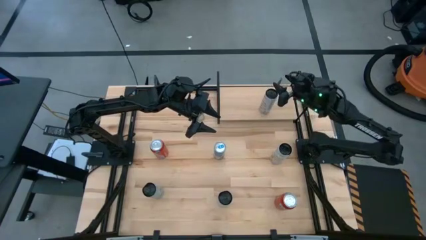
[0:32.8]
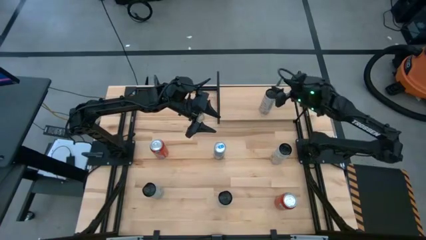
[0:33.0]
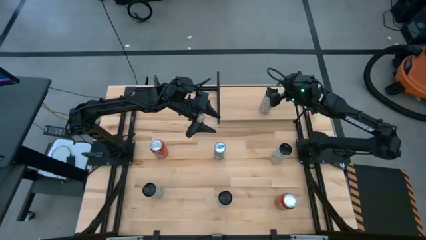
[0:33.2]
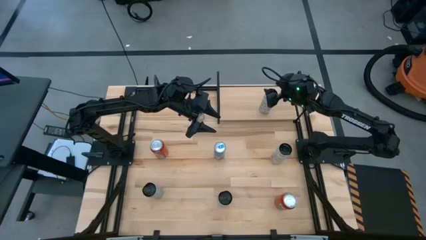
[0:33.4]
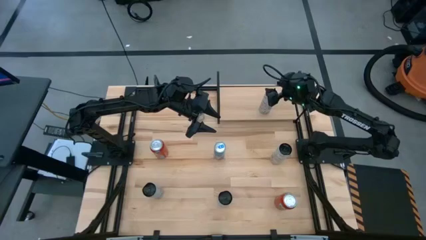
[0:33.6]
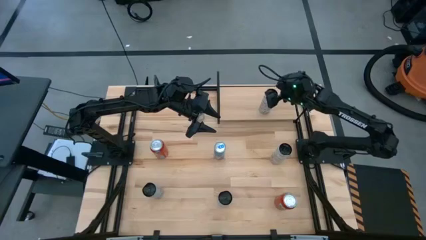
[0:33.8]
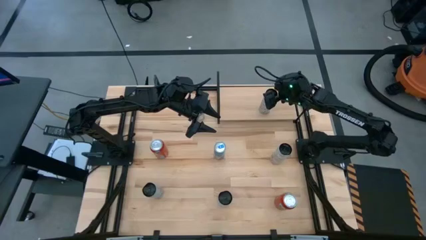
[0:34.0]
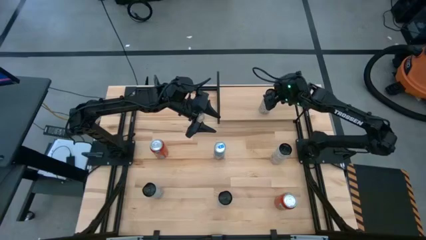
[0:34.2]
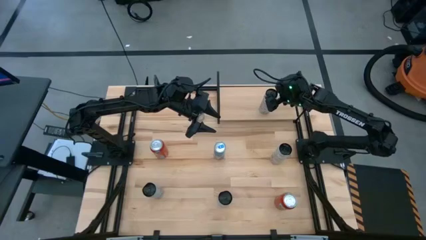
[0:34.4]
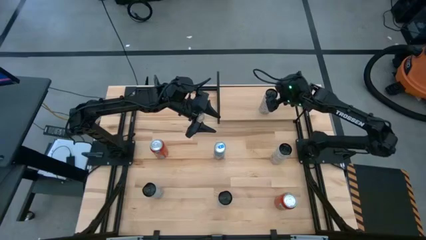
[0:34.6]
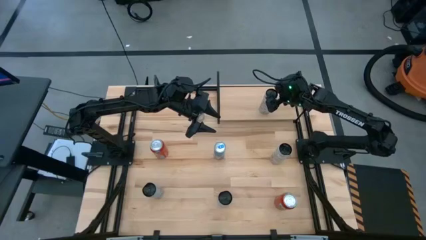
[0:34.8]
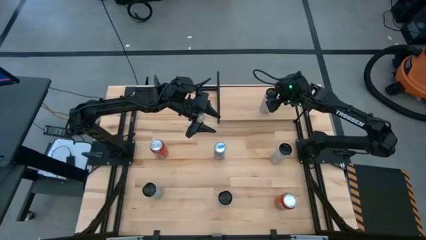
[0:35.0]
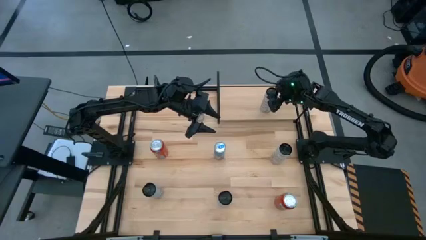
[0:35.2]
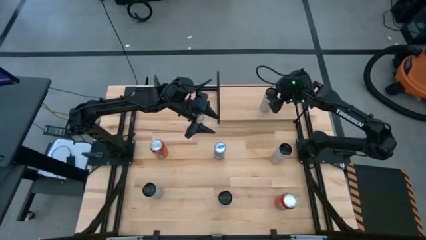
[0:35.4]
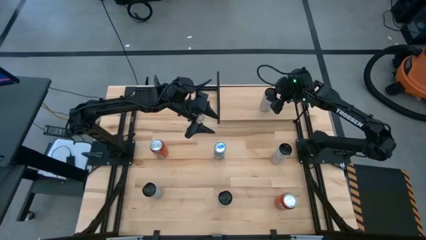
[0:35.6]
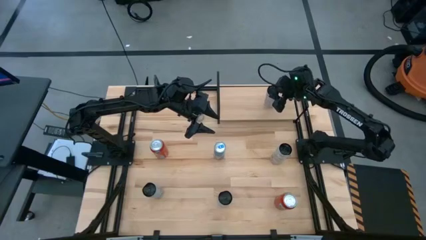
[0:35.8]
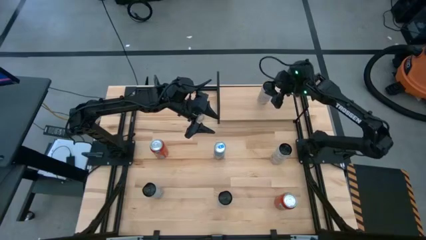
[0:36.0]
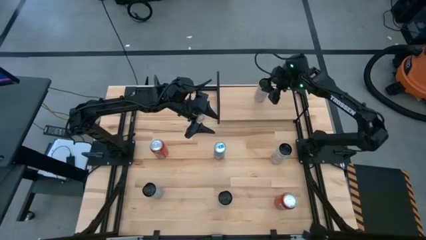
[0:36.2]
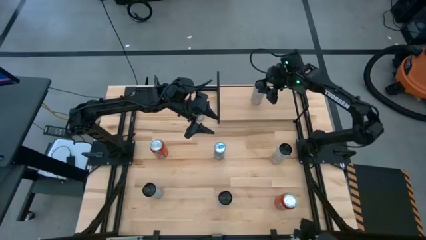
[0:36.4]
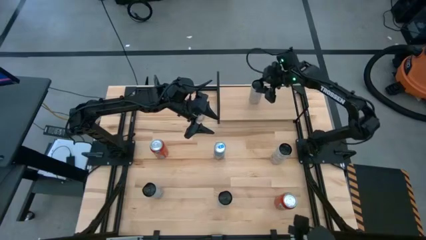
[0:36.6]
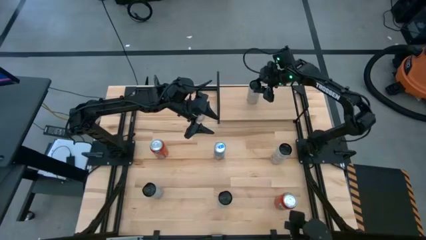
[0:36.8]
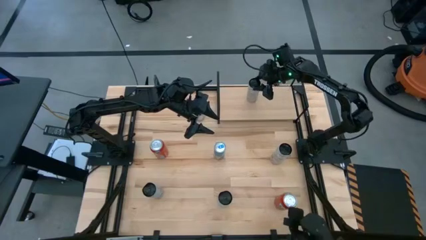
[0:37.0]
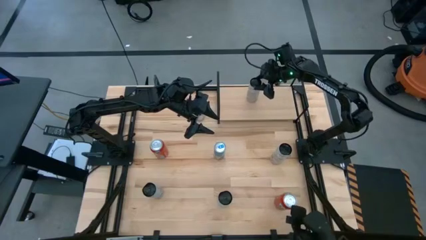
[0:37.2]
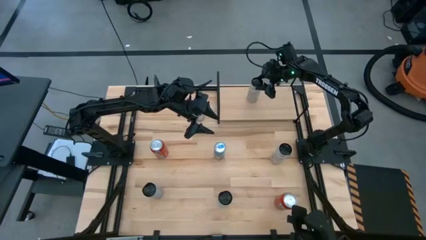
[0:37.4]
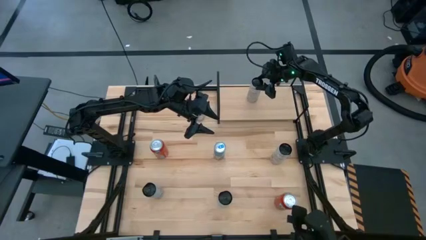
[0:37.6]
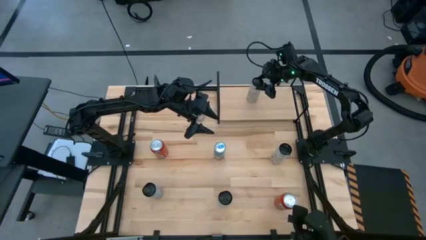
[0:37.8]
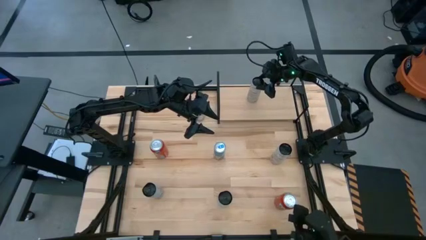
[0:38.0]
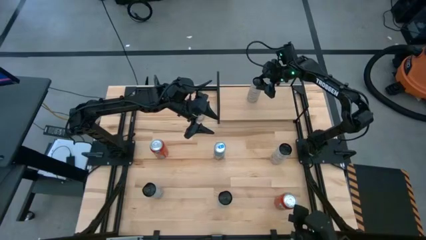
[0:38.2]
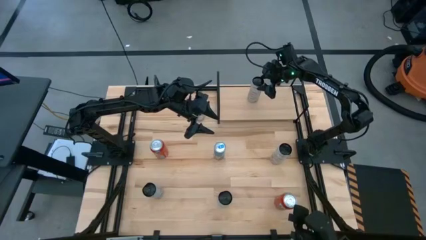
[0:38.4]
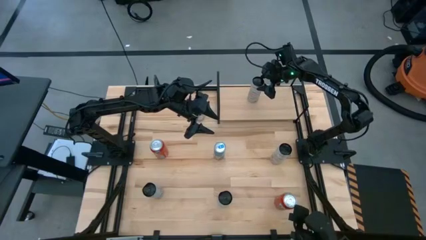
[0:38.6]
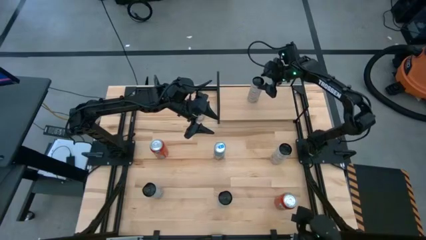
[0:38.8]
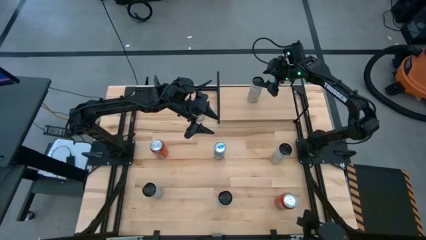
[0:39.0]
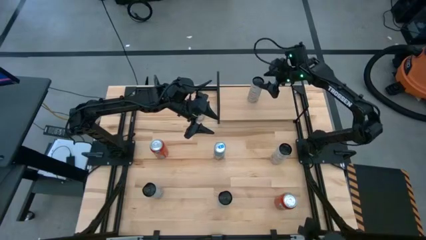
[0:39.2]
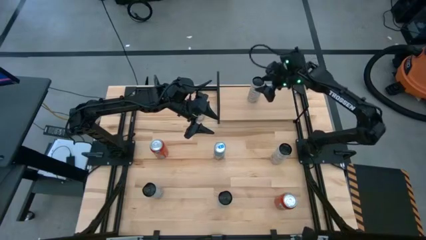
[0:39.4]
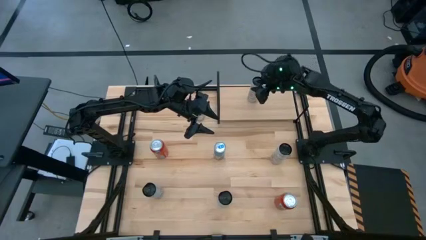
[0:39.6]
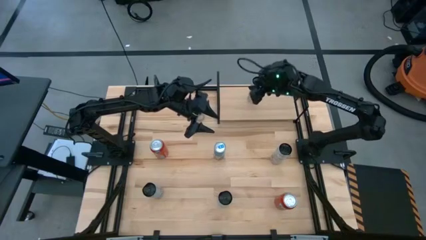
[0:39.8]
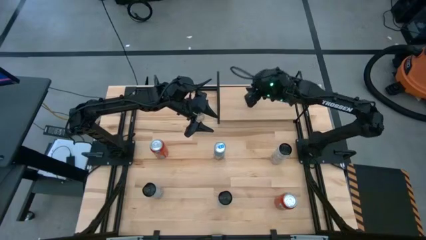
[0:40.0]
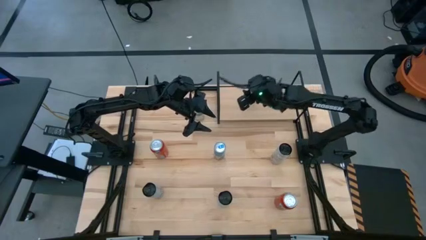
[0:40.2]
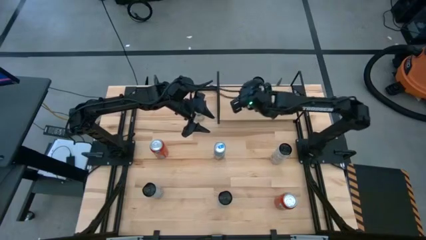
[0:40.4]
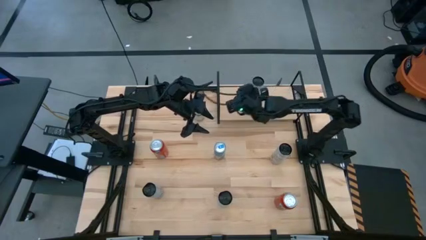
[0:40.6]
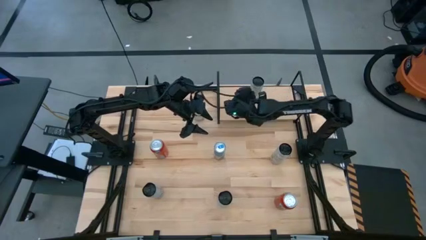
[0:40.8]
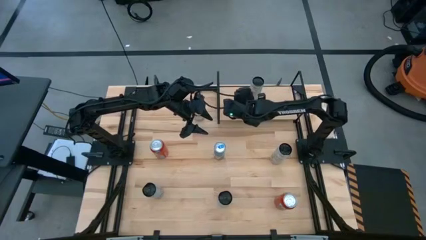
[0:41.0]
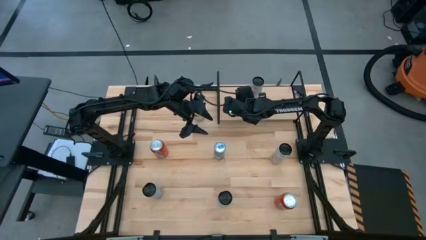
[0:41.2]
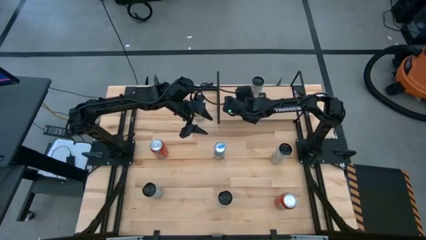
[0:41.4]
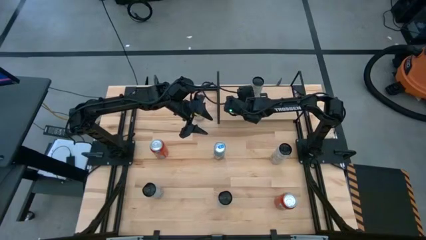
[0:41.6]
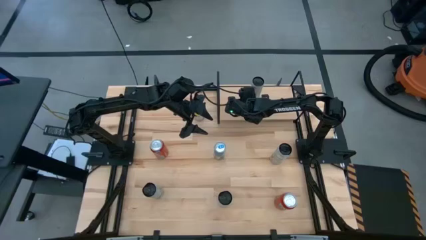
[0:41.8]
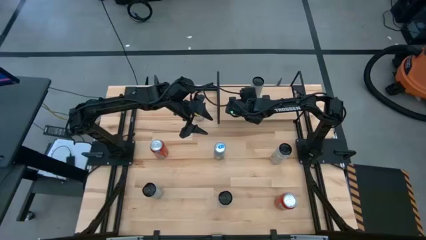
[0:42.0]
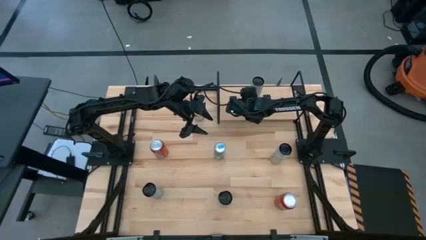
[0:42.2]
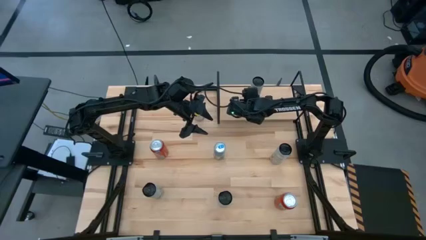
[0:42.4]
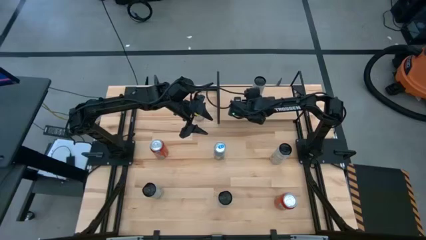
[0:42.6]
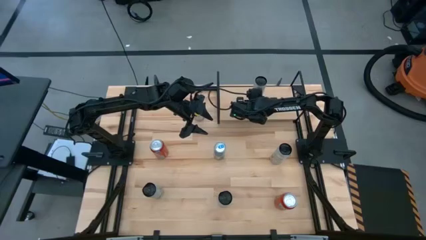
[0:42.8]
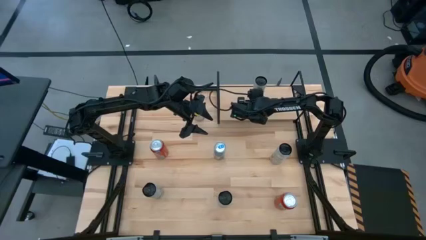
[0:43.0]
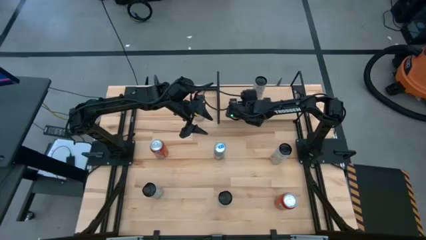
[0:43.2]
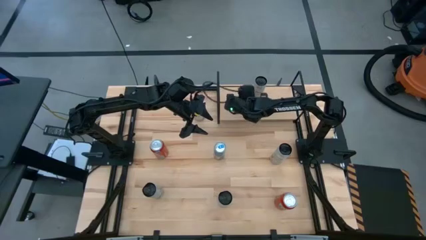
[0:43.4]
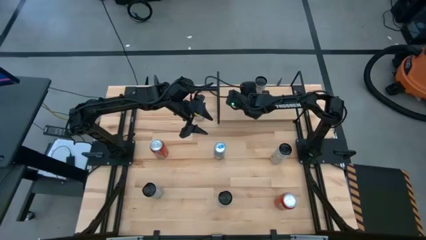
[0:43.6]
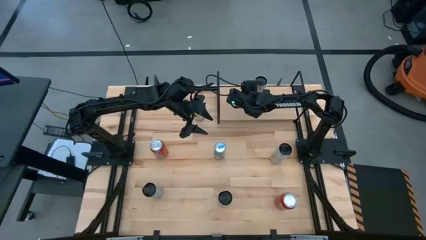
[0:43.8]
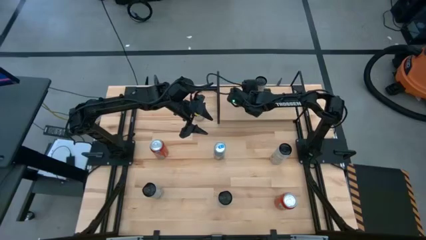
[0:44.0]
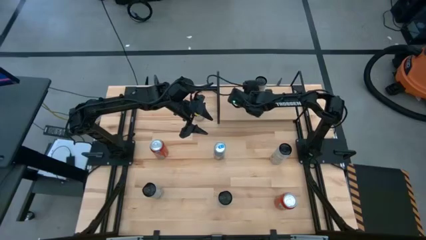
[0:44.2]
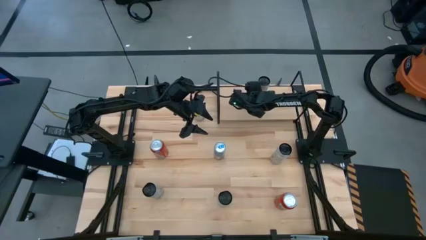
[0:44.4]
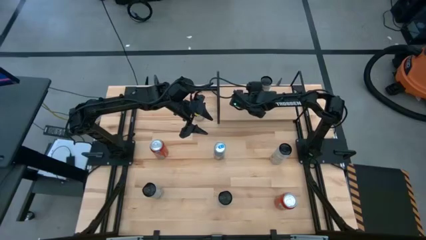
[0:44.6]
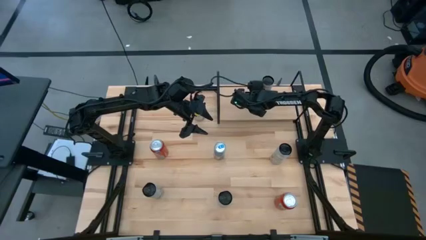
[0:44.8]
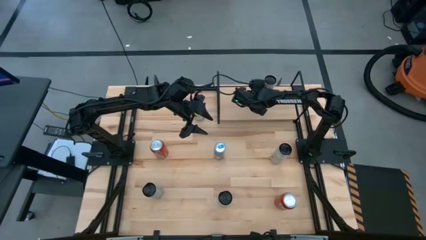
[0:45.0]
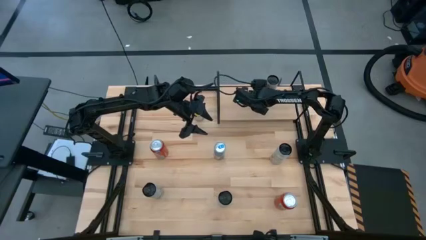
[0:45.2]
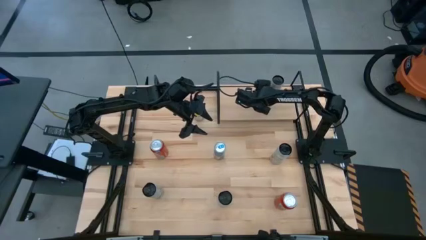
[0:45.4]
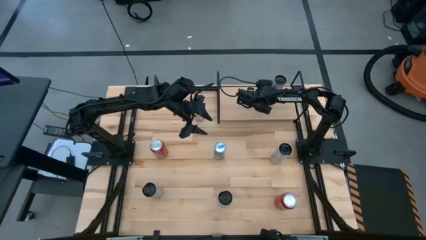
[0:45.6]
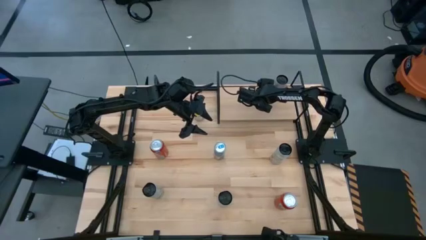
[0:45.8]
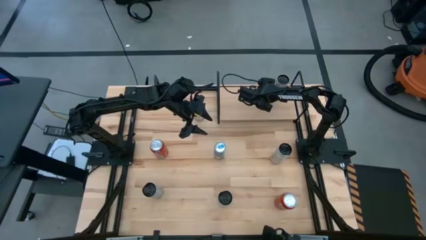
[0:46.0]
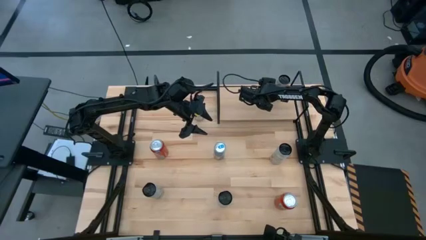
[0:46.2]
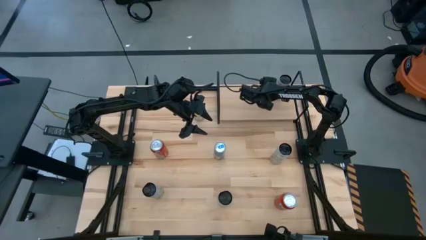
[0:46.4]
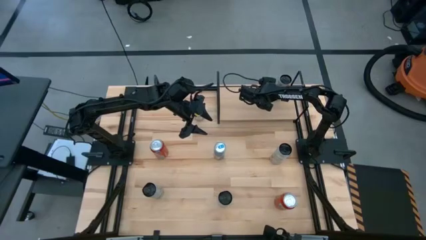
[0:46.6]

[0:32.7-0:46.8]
Task: Place canned beverage on shelf
Put the top white yellow soda can on the shelf

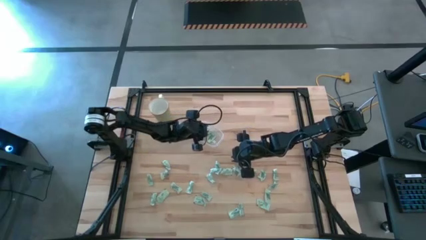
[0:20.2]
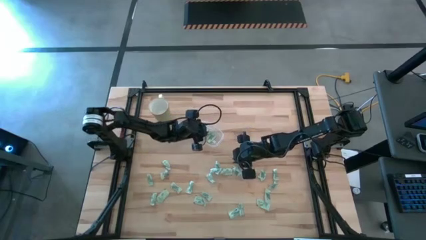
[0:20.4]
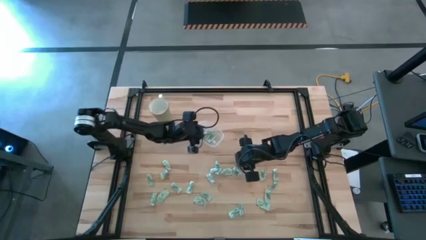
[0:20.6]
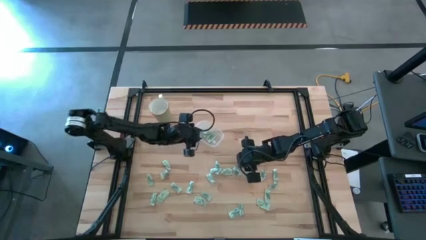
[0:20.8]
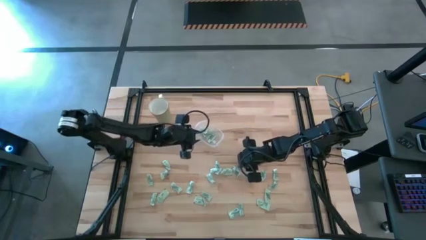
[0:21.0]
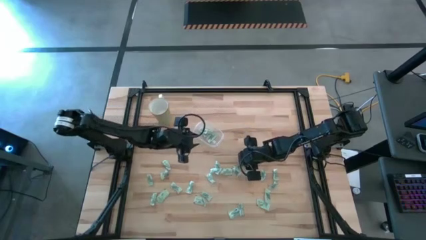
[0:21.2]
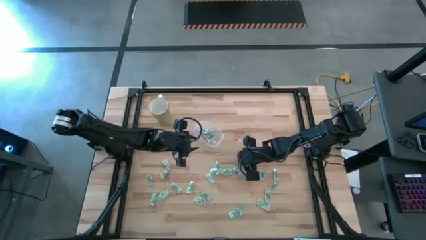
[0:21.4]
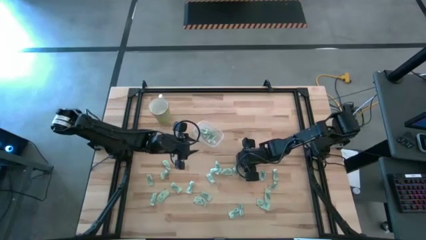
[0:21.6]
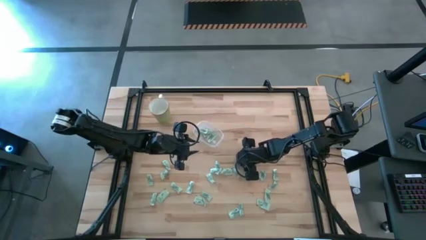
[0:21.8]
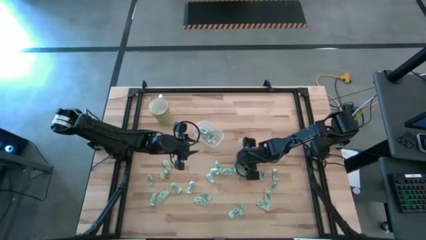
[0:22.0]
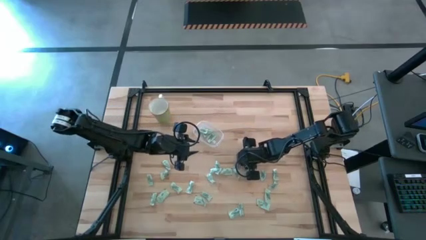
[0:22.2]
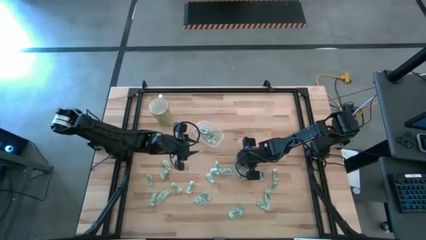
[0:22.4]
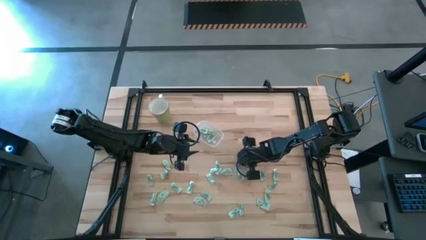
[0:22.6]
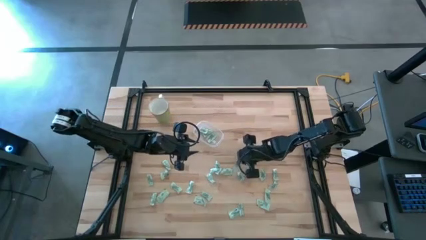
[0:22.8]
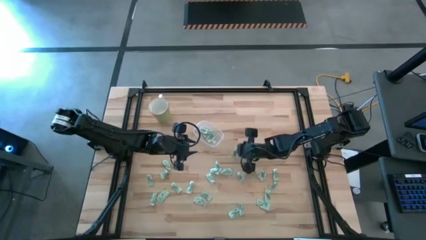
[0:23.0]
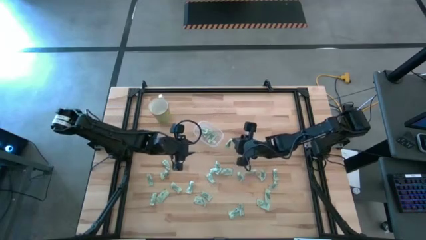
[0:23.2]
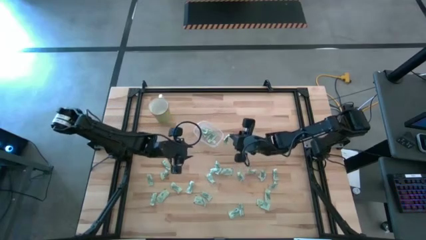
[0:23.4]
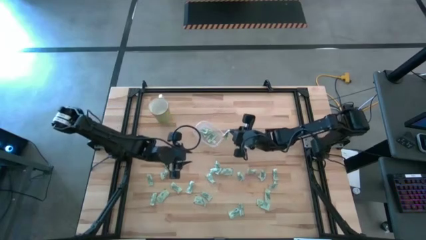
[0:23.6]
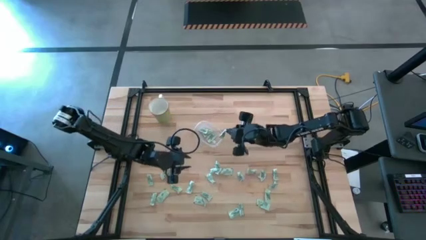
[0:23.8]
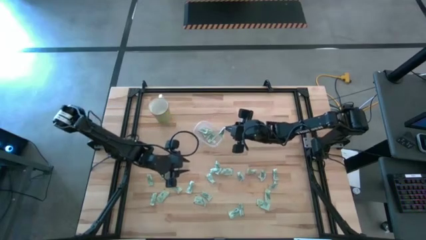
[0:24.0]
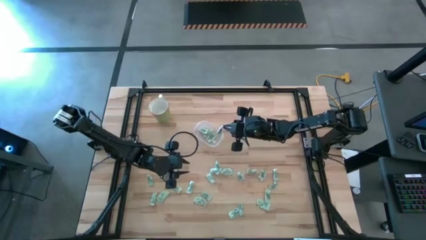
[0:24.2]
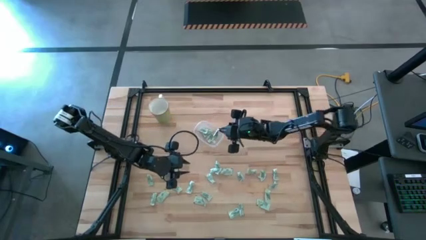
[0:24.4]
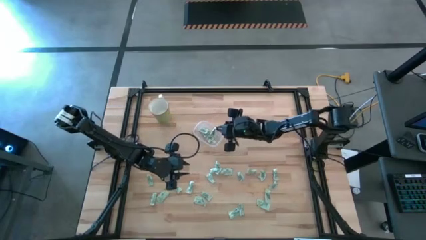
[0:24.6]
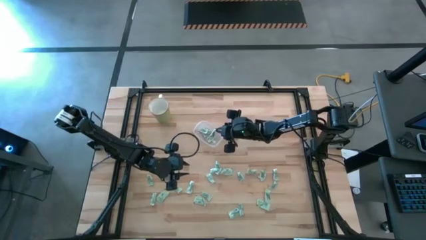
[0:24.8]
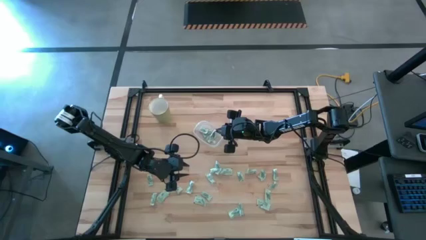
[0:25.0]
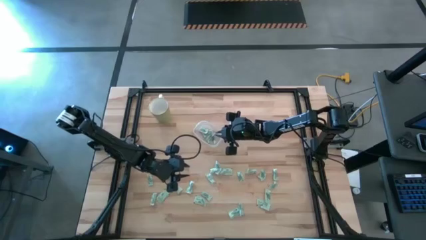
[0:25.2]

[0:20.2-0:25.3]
Task: Pick and place Stevia / Truvia into bins
Put the stevia packet into the transparent container
